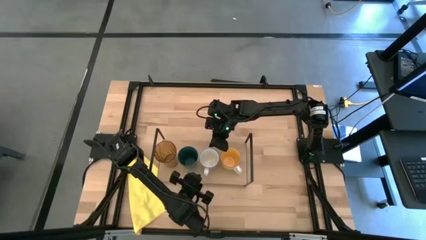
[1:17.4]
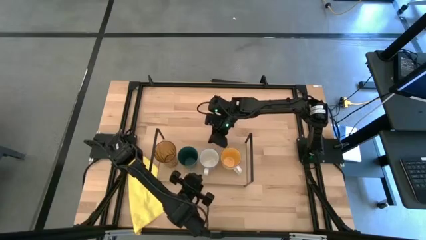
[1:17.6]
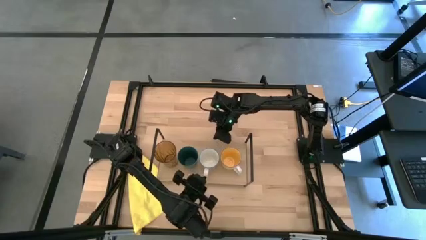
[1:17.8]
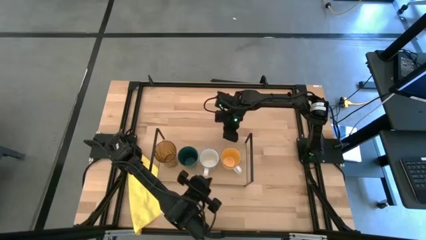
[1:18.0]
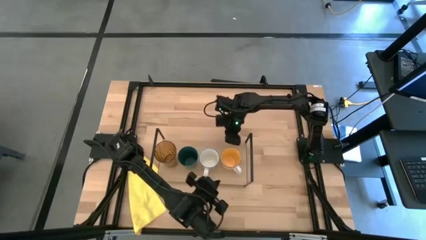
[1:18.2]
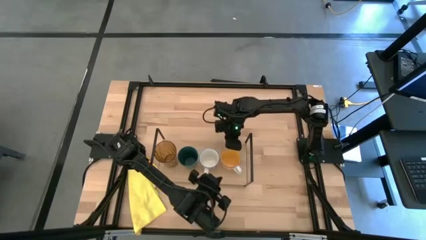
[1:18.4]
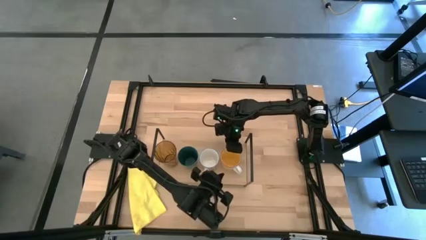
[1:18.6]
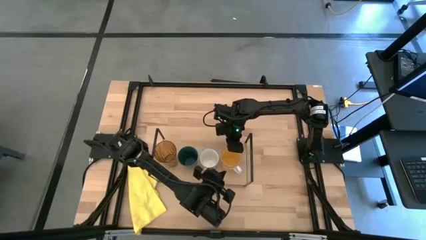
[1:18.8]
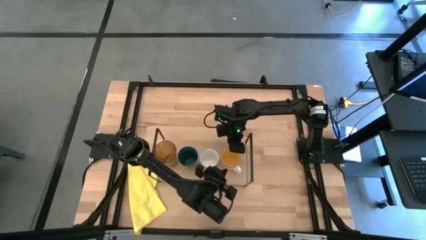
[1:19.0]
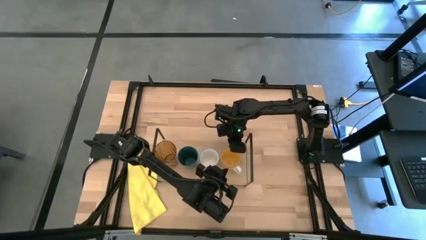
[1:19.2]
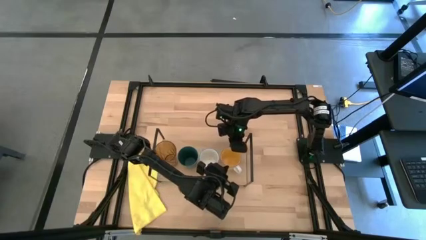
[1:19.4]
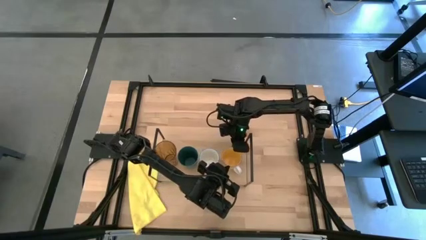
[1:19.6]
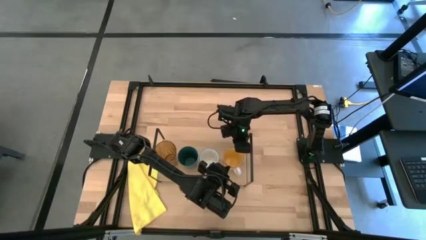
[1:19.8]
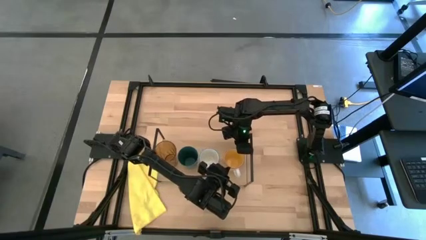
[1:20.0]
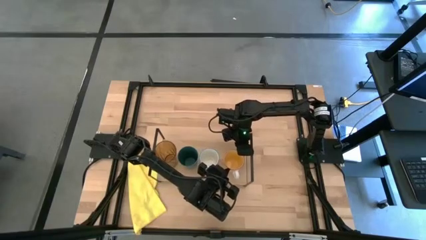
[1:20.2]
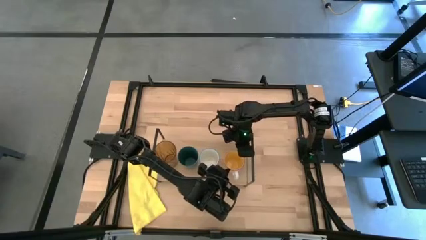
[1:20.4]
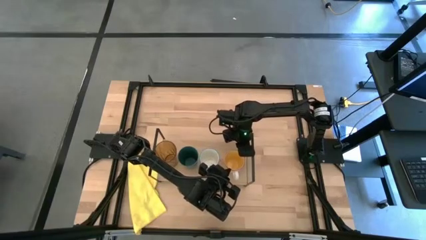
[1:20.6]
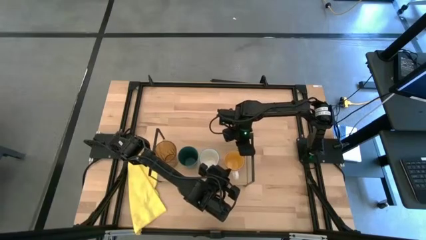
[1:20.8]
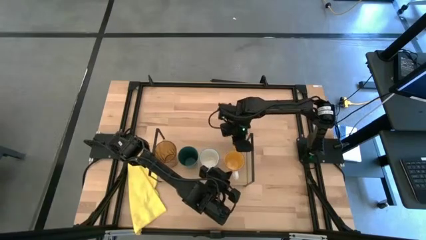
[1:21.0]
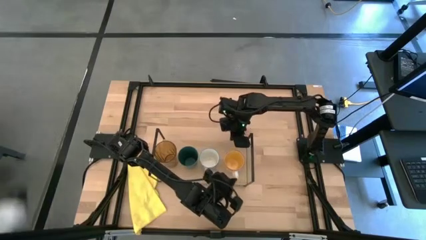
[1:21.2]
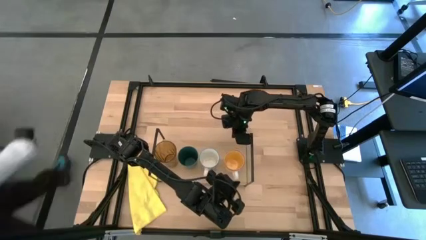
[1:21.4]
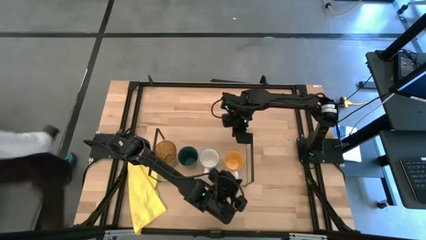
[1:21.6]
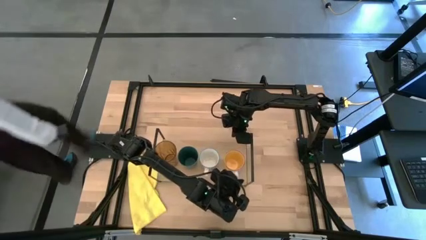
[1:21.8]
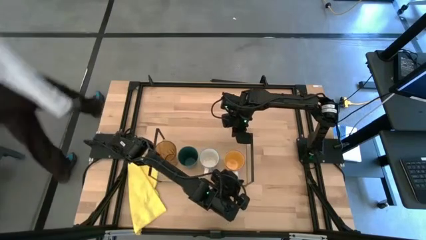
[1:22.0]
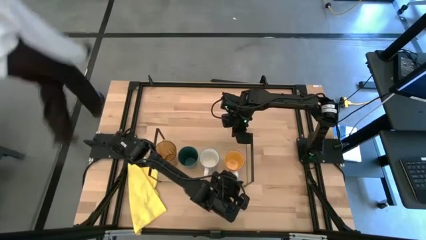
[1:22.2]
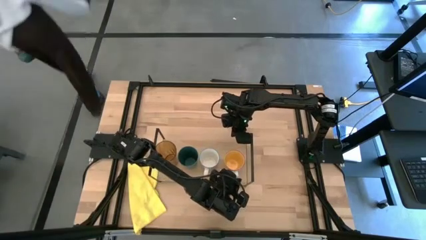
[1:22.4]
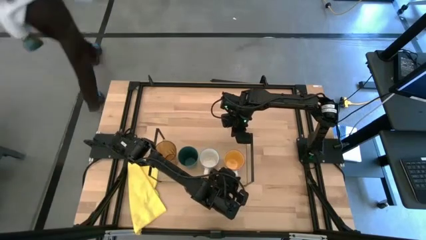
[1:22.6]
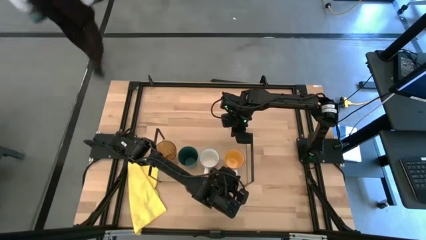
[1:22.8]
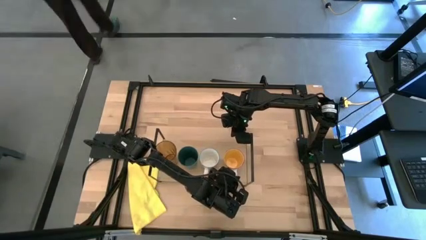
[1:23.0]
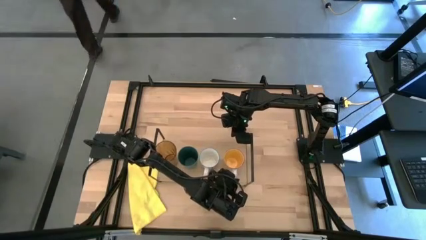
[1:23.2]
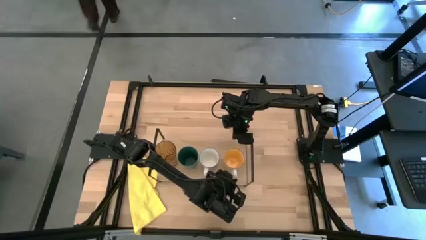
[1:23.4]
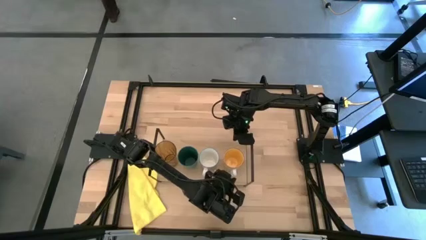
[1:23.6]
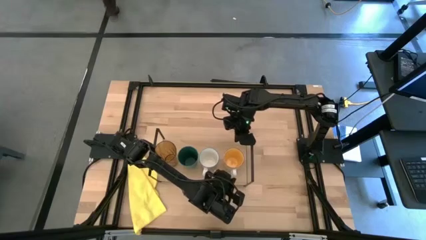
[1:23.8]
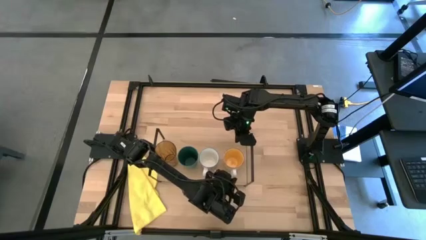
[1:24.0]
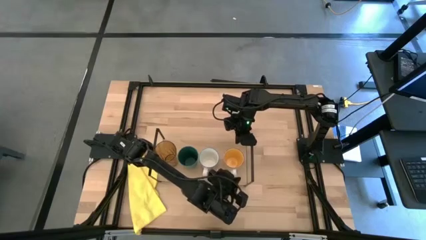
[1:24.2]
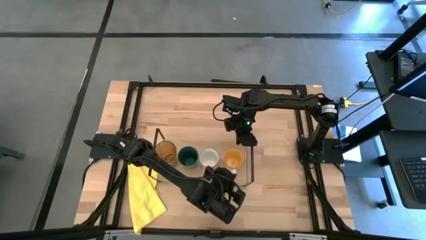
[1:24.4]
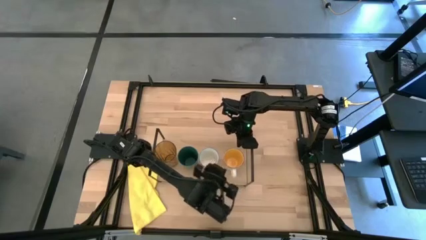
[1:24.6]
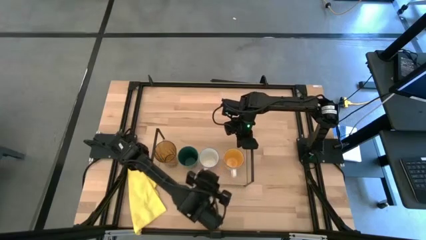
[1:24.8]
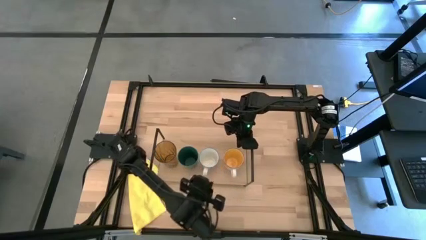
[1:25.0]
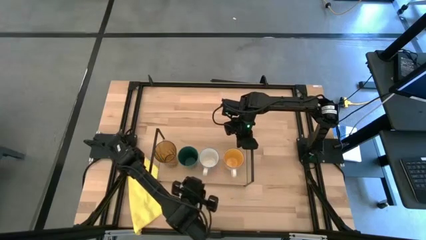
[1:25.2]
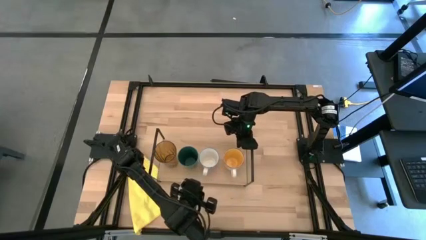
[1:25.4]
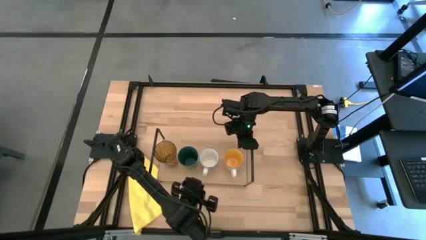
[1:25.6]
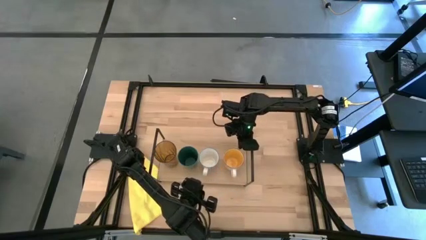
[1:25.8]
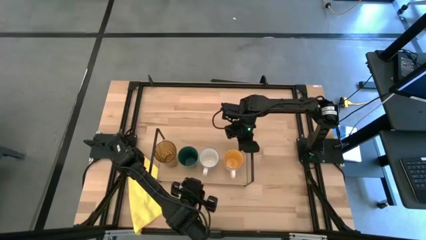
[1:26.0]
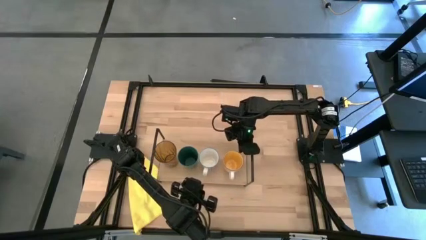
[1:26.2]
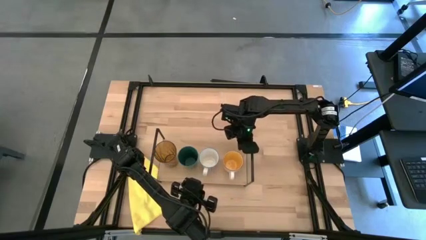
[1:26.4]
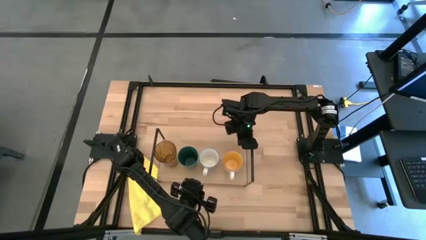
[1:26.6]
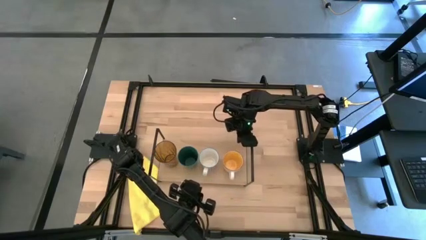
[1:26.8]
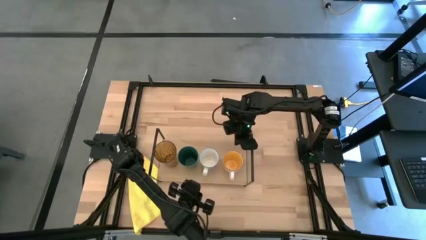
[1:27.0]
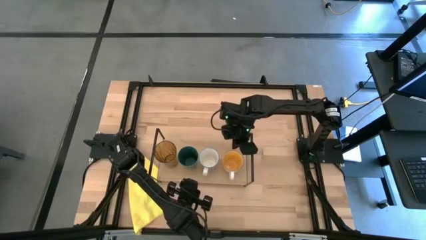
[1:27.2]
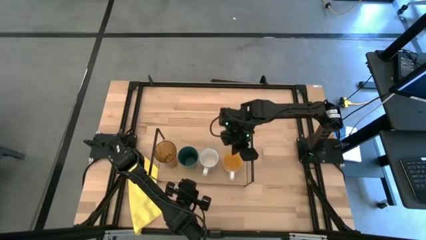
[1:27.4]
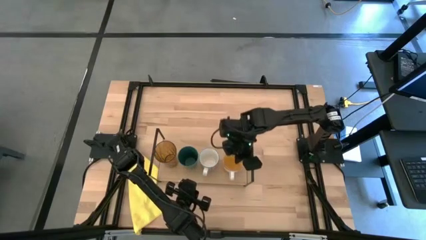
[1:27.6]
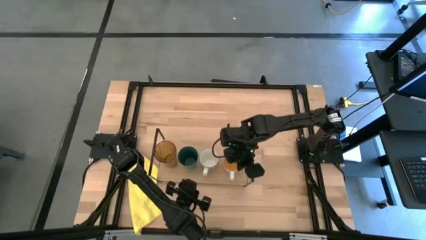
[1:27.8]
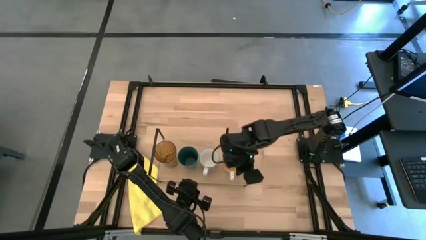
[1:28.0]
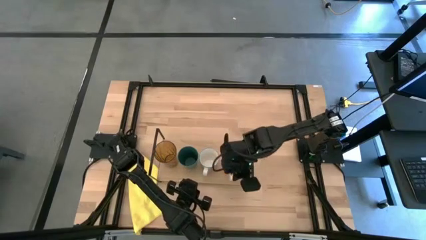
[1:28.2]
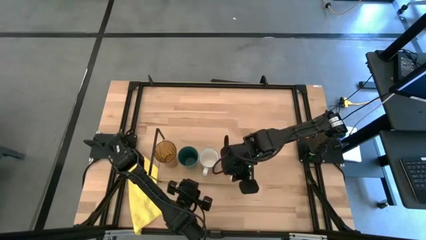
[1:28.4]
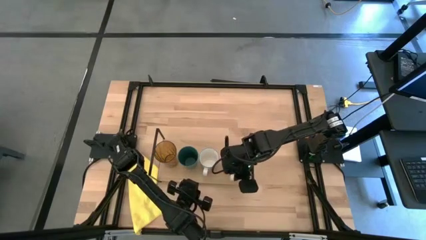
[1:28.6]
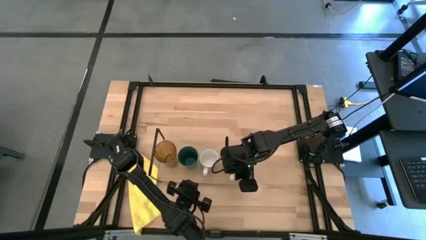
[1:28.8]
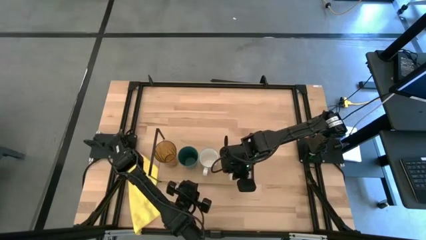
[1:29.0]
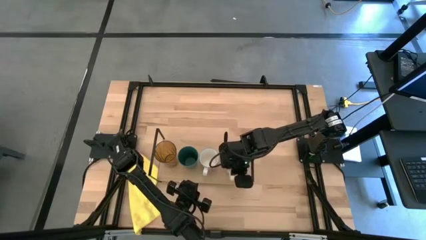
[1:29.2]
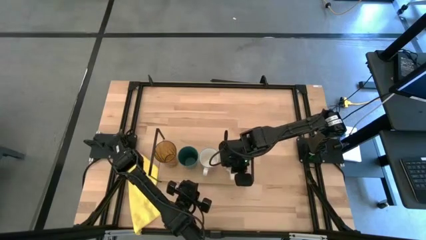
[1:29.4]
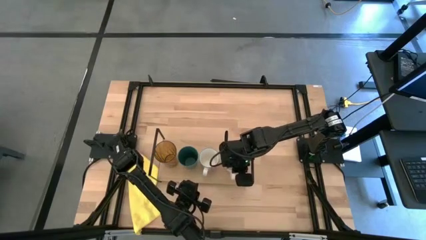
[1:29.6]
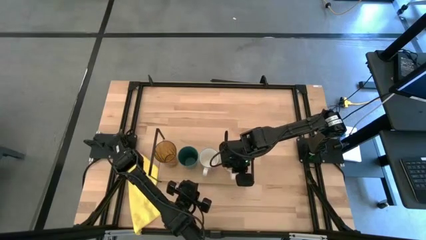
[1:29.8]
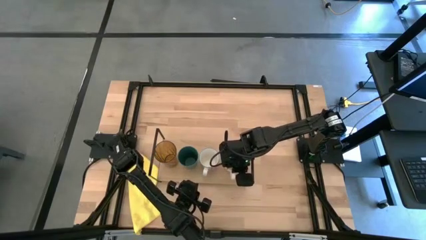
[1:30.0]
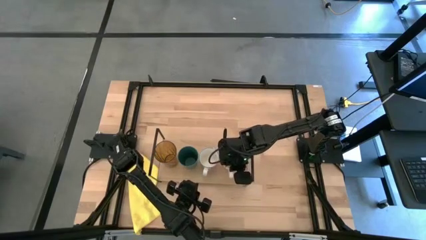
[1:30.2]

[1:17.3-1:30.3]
Task: Stack small to large cups/mugs on shelf
Adjust the yellow mug on the shelf
